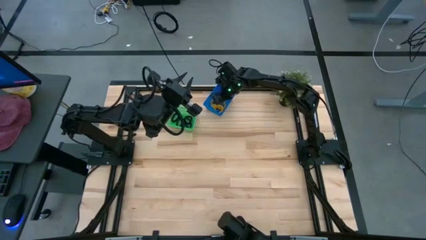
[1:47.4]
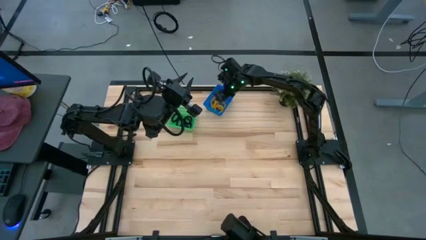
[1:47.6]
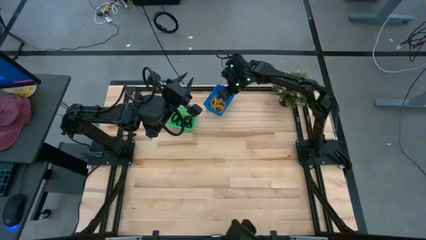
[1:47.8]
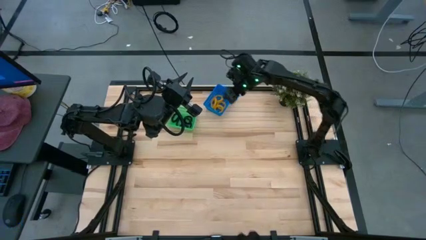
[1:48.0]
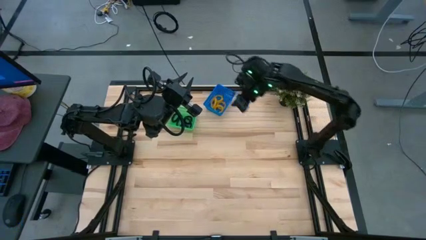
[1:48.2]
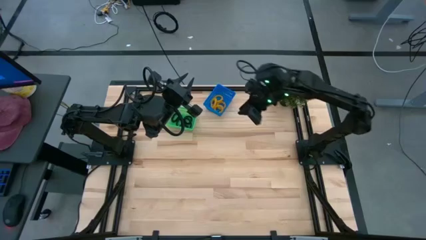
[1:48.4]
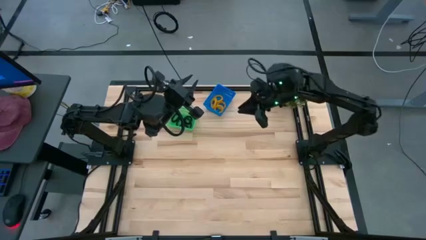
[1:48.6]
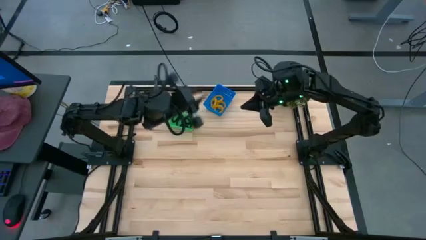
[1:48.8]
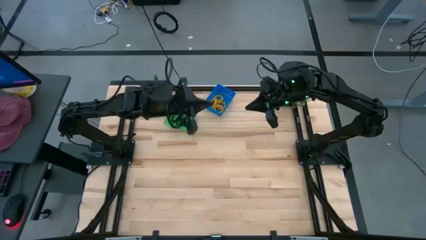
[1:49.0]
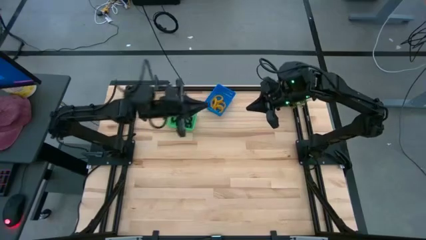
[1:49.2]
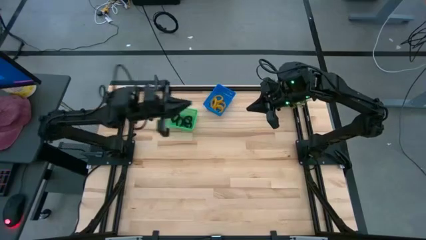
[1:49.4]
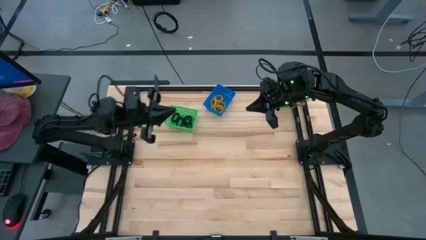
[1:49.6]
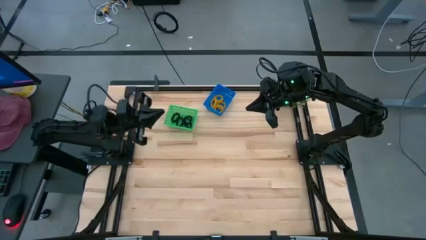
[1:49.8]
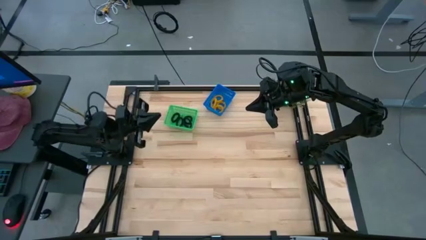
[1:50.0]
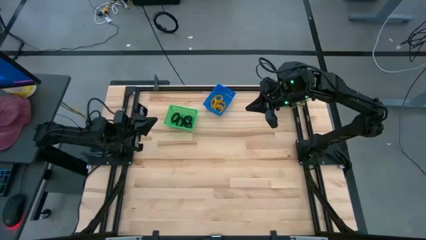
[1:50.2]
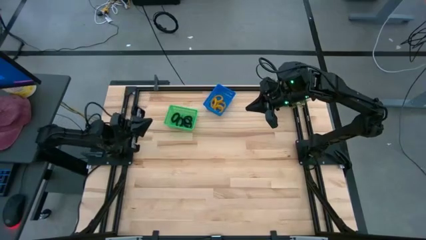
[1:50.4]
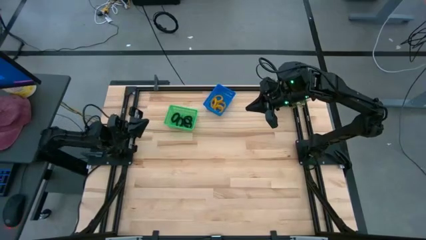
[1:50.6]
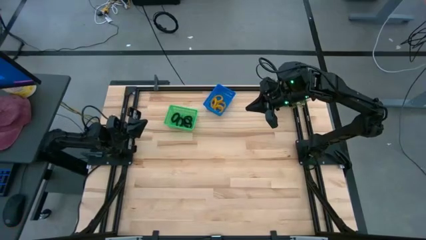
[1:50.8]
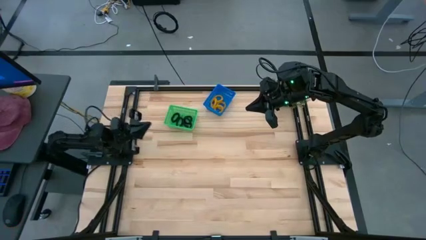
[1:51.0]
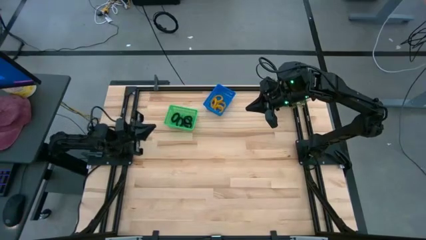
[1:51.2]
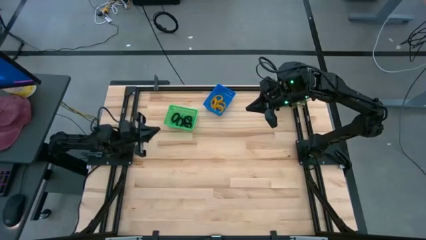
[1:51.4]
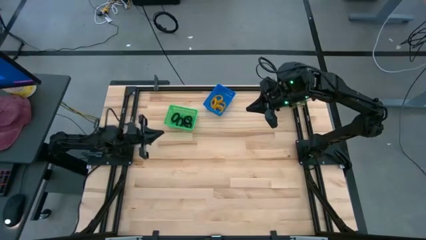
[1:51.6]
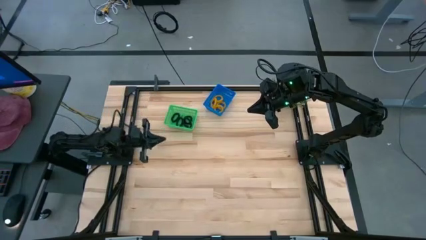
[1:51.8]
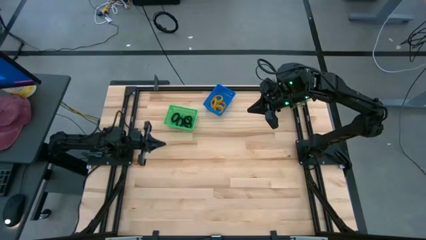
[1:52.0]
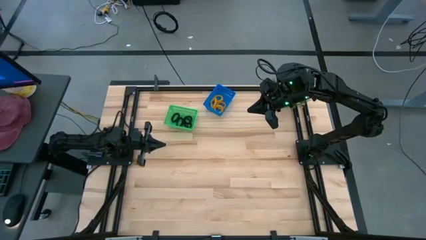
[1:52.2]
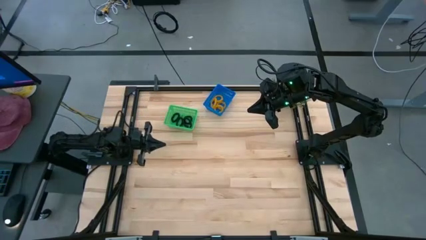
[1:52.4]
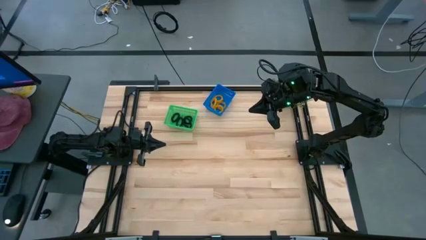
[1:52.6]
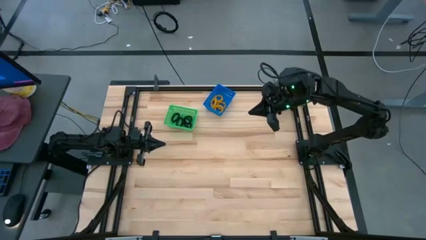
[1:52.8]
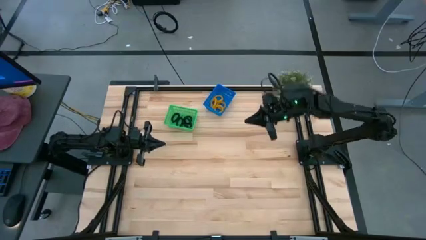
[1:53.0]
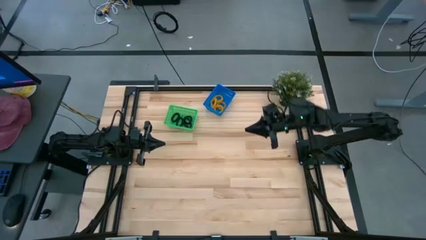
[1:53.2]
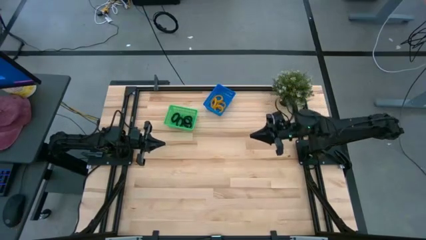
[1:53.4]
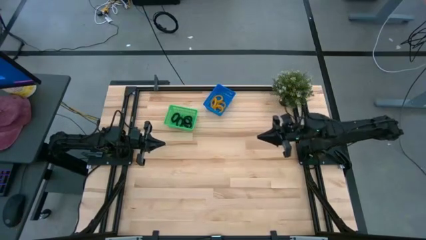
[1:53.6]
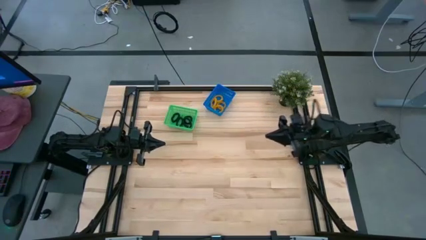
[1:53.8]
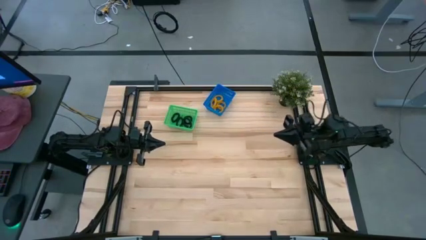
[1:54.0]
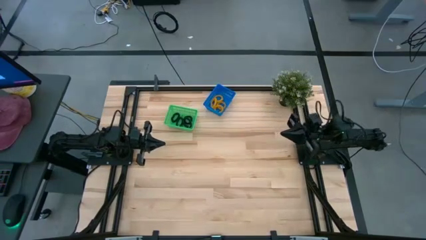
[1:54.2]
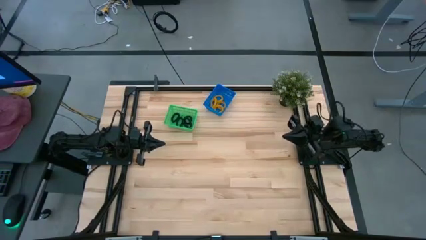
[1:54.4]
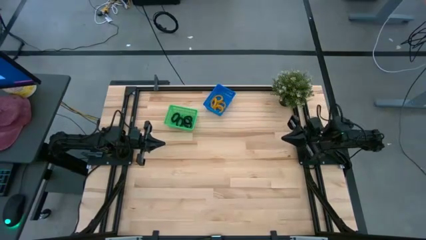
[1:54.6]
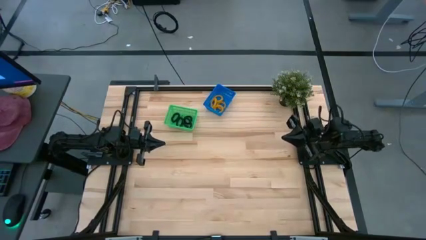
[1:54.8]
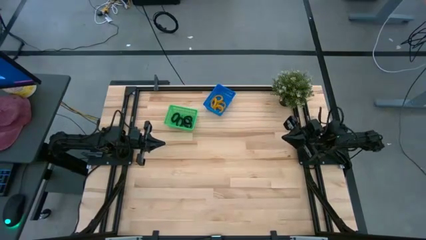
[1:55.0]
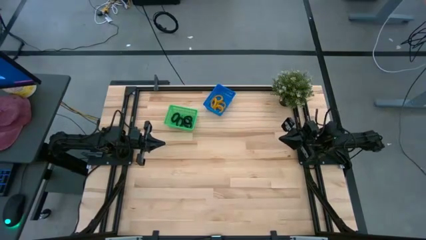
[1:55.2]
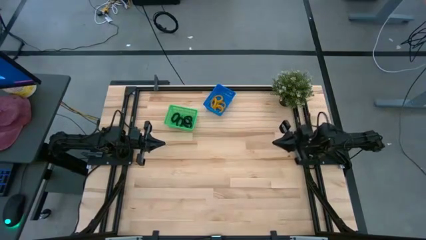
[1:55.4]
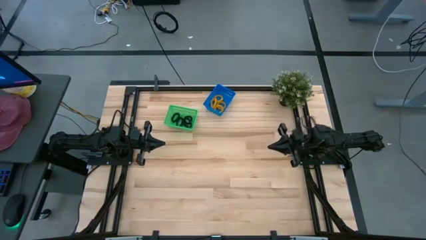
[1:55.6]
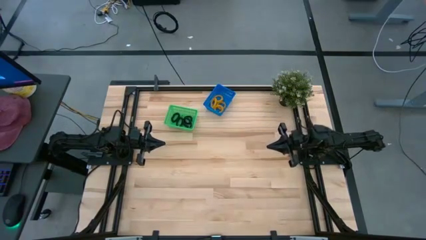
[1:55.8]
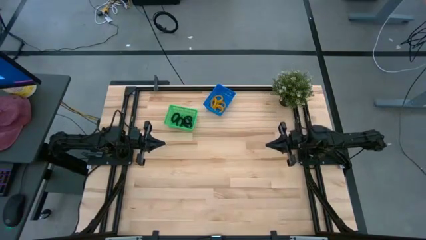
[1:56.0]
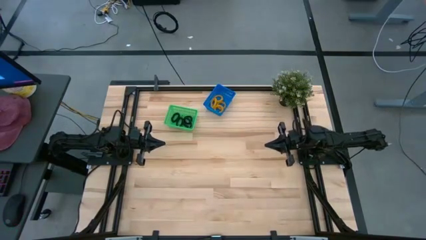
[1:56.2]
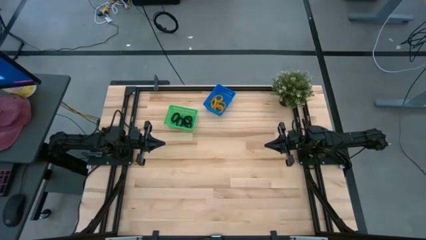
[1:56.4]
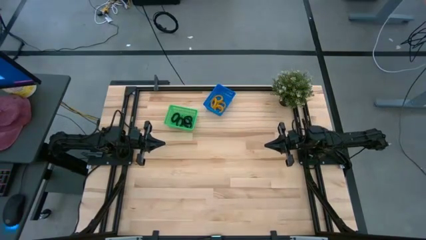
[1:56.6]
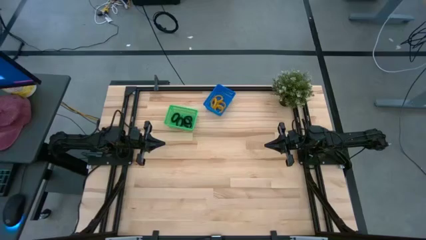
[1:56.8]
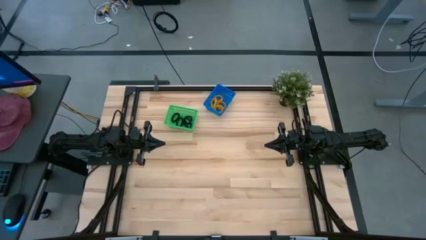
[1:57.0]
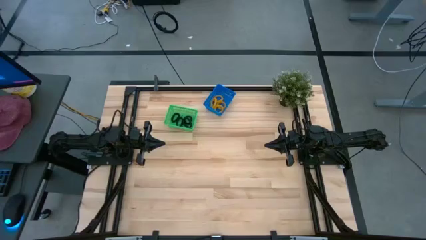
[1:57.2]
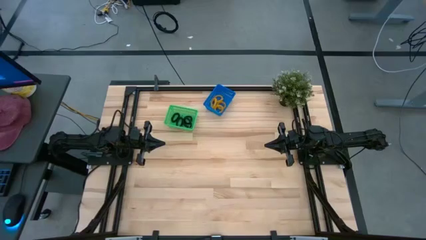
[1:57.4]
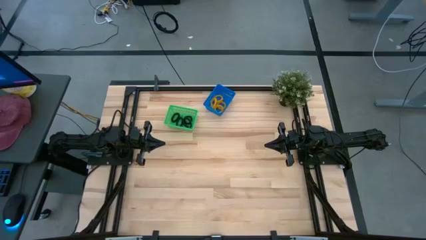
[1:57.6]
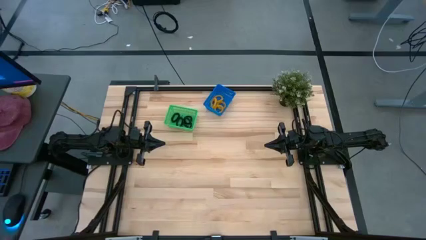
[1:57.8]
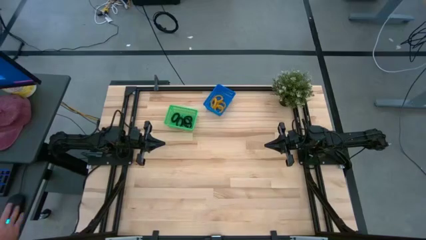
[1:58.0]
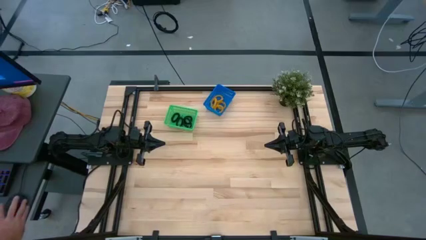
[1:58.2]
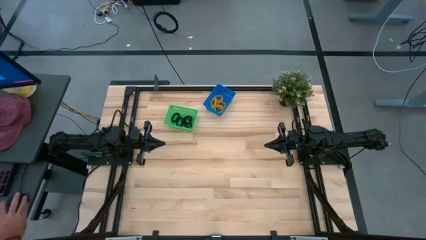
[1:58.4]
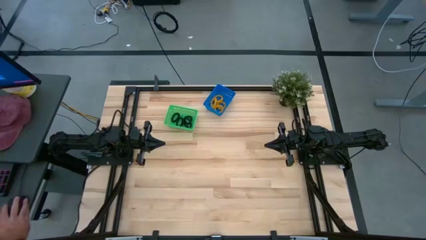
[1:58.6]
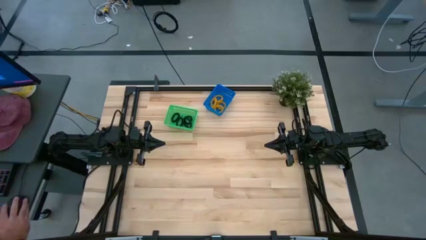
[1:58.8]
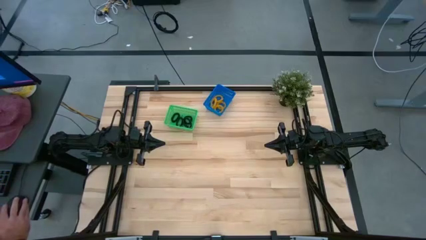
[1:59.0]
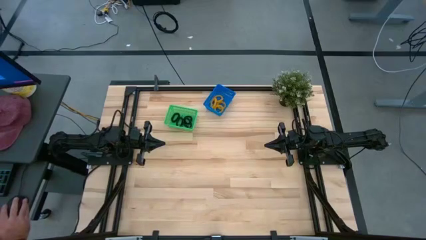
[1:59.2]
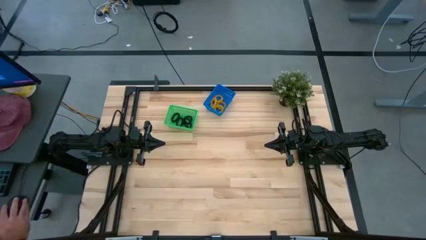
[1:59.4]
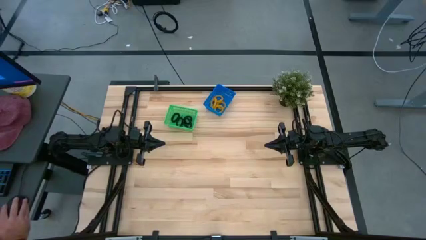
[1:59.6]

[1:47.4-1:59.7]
Task: Sort spring keychains into baskets
Return to Home Position
